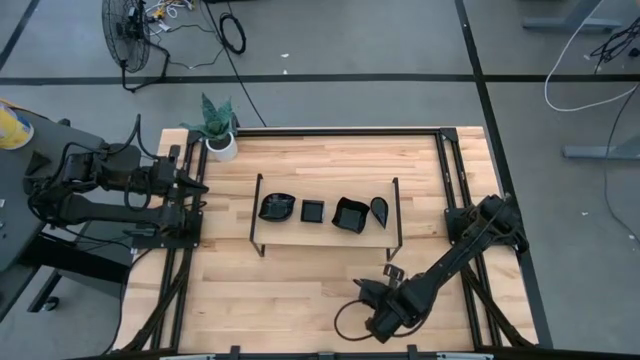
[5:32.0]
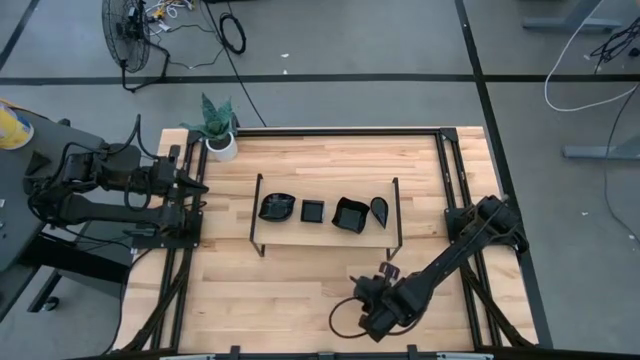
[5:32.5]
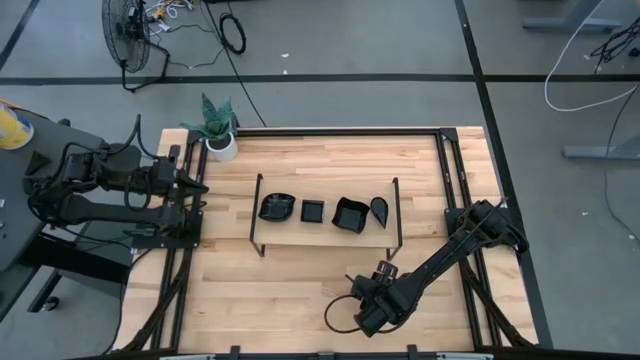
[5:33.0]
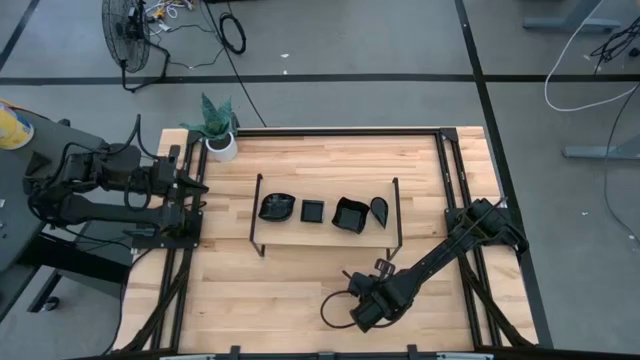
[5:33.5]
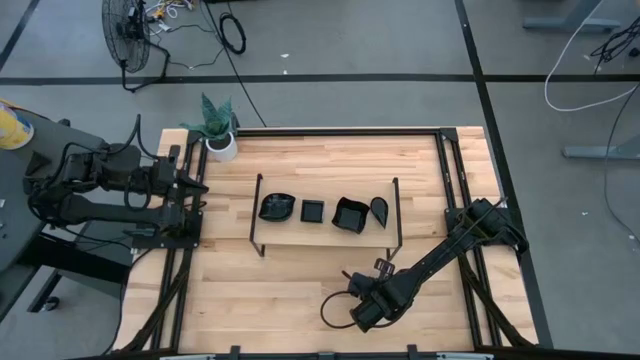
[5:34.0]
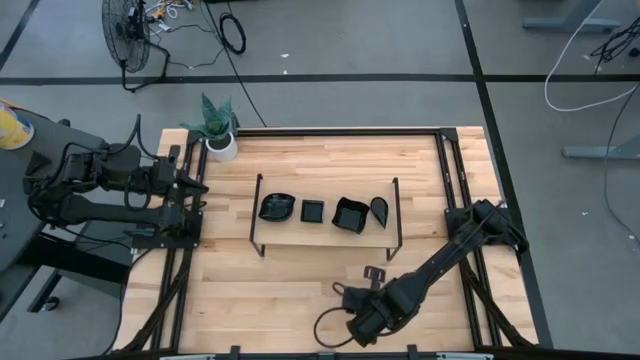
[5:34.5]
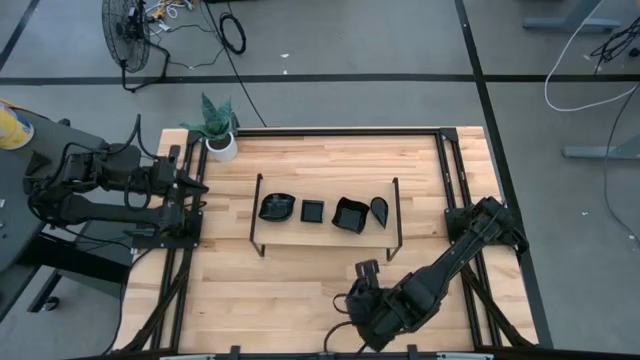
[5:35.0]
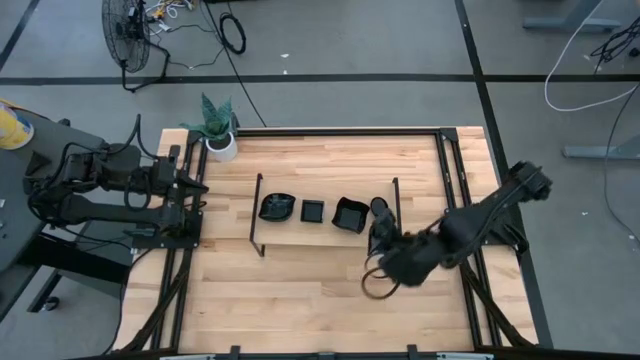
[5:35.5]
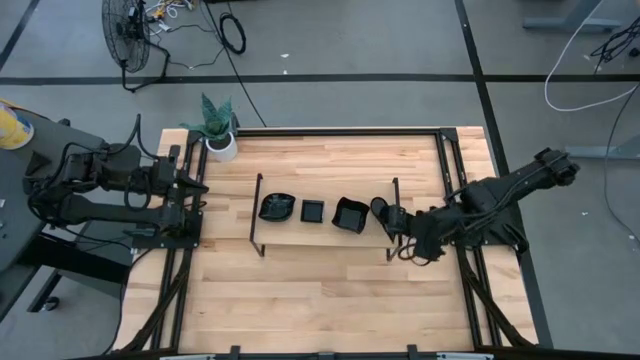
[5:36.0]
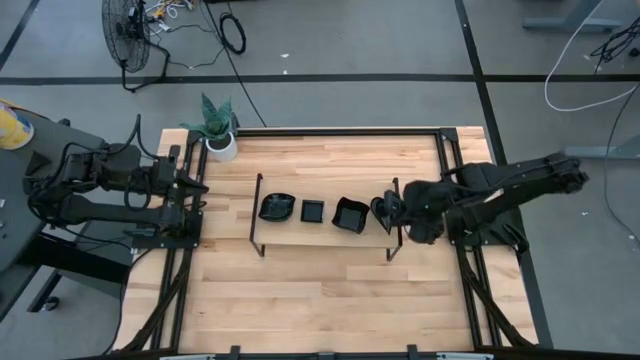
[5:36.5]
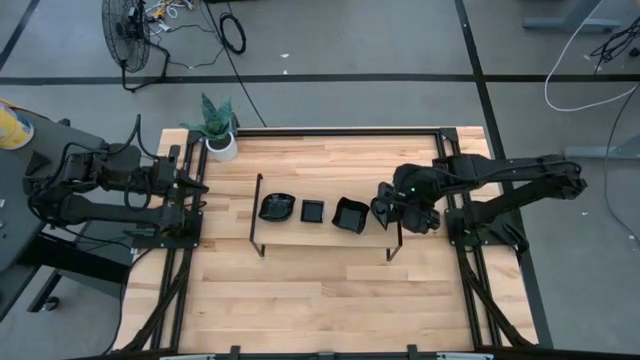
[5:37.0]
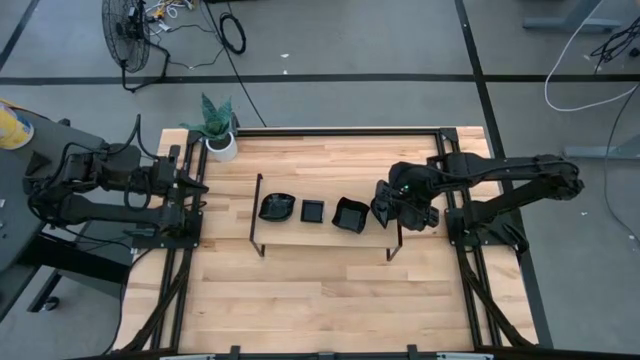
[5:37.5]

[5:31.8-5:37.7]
Task: Pick & Place Mini shaped plates
Stack the drop shaped plate on top of the drop shaped plate on the shelf

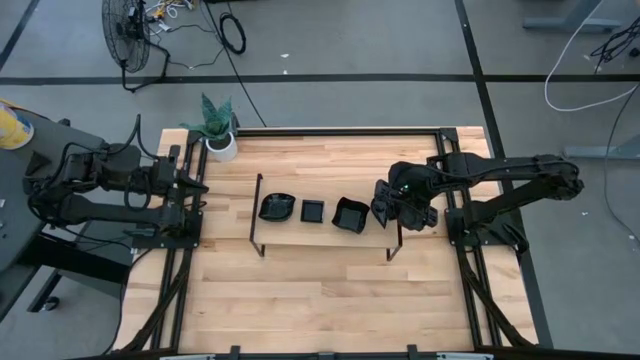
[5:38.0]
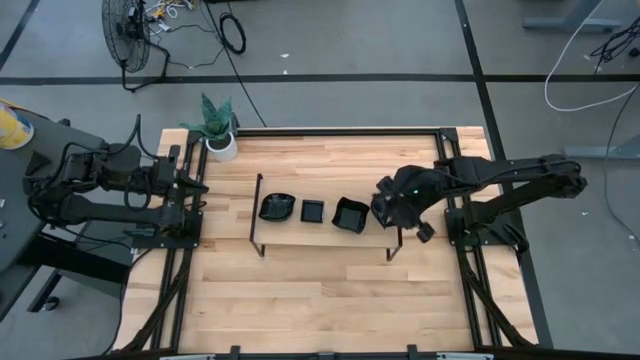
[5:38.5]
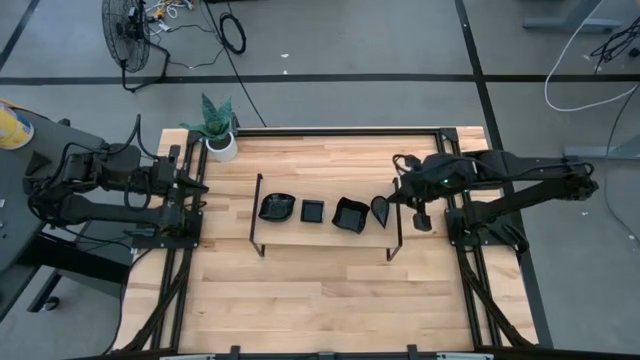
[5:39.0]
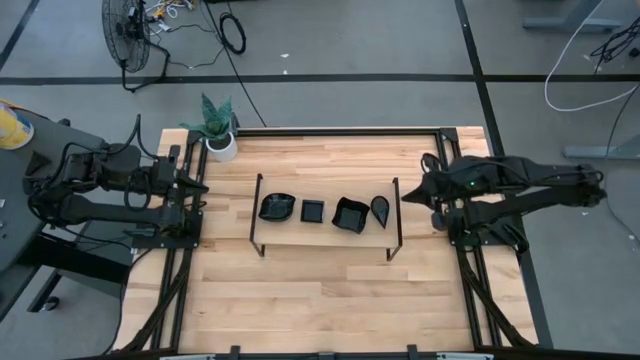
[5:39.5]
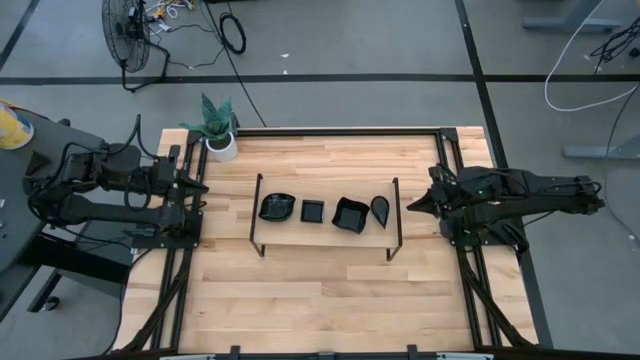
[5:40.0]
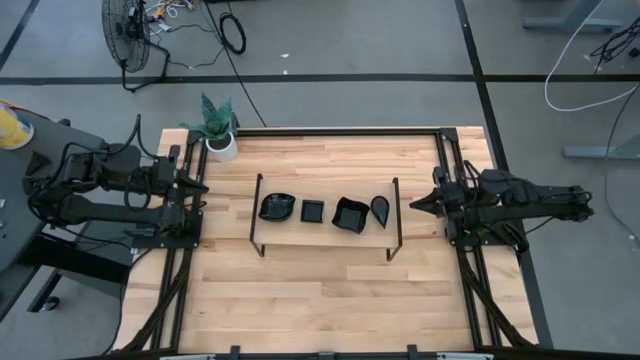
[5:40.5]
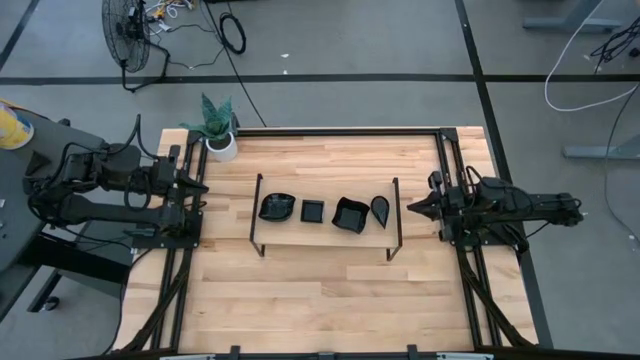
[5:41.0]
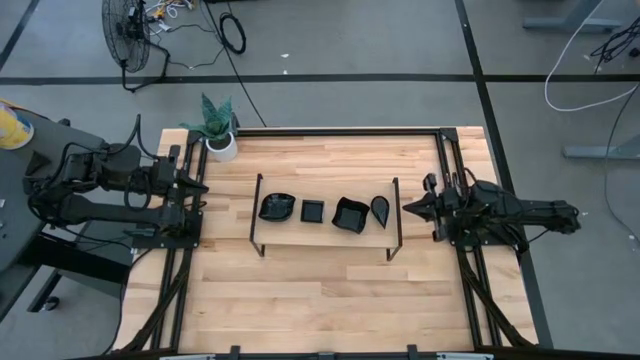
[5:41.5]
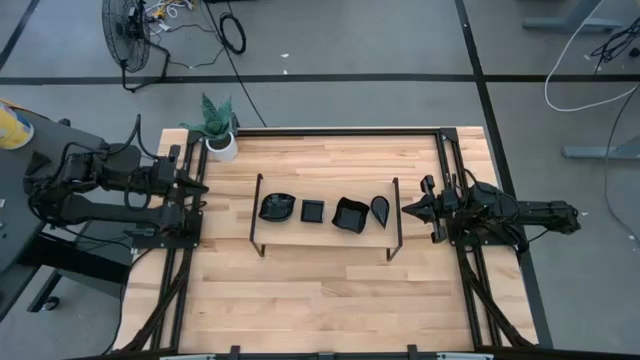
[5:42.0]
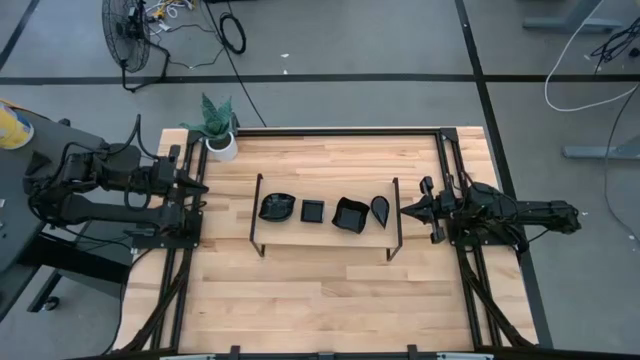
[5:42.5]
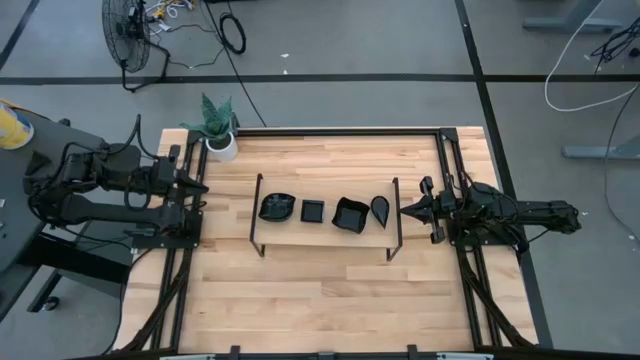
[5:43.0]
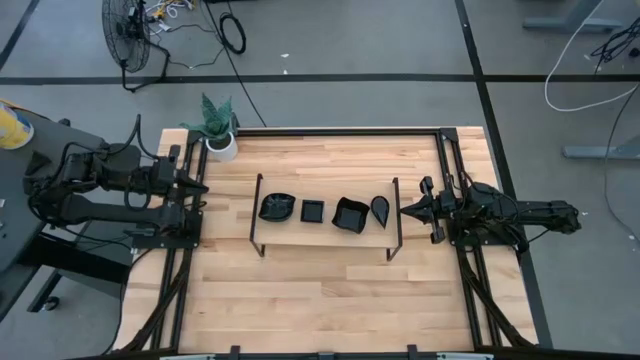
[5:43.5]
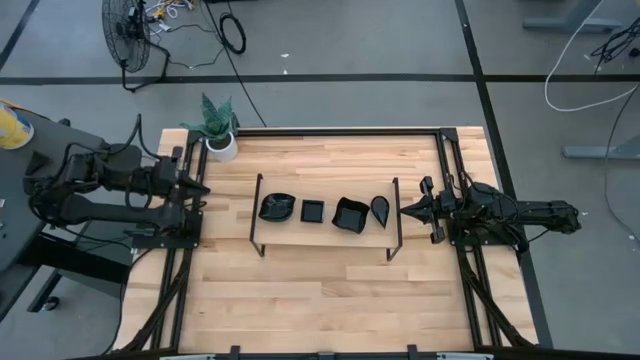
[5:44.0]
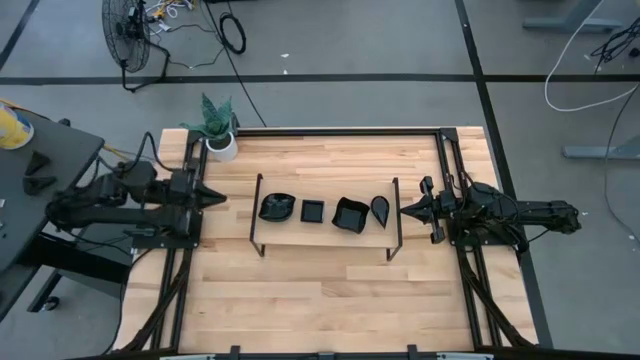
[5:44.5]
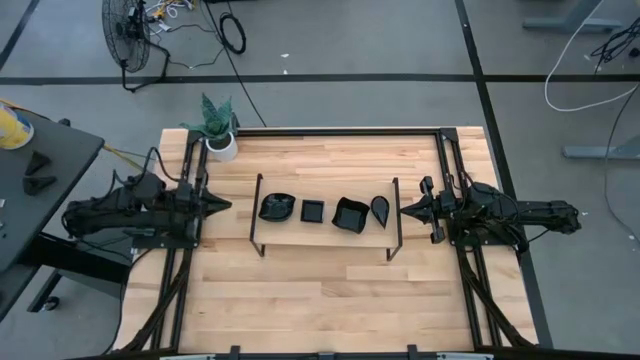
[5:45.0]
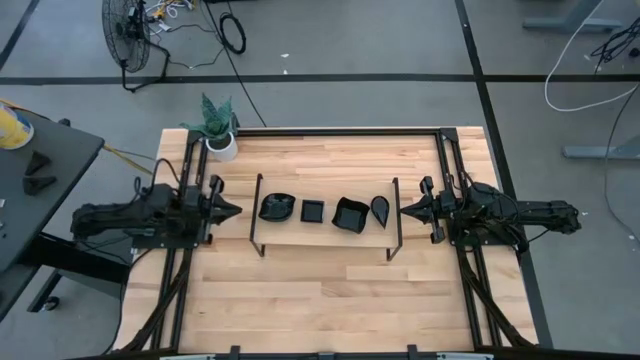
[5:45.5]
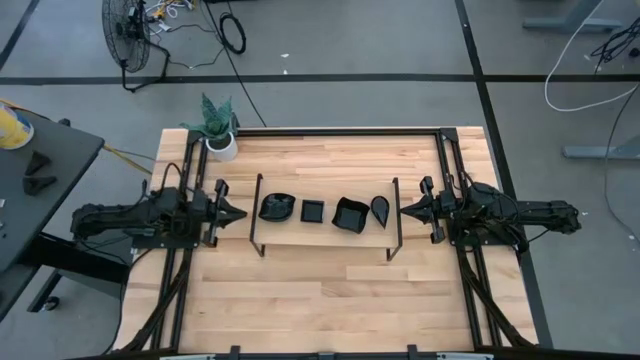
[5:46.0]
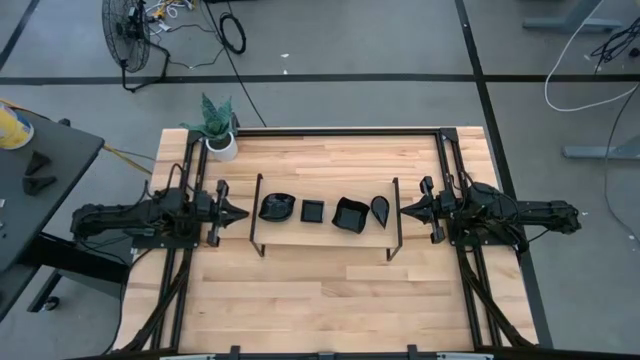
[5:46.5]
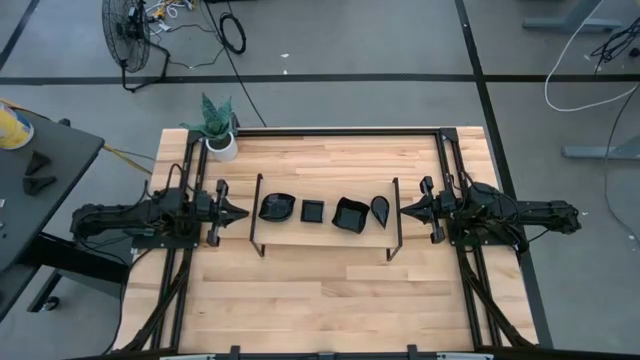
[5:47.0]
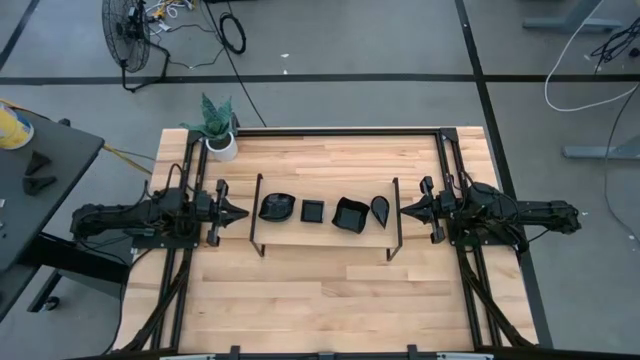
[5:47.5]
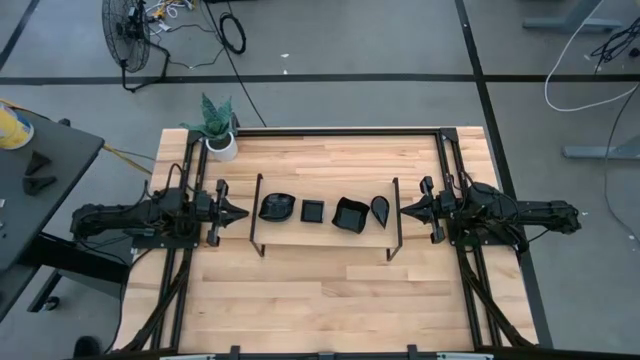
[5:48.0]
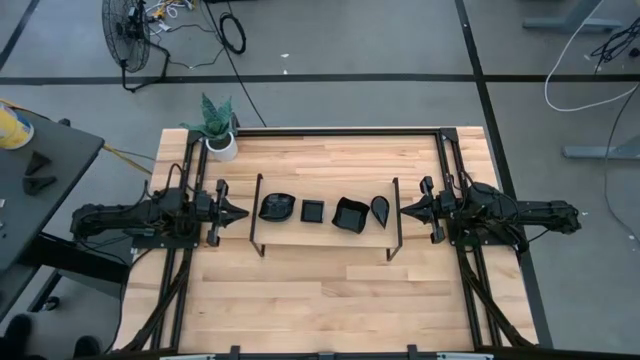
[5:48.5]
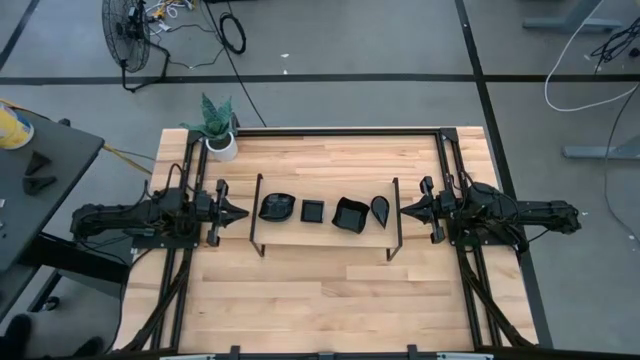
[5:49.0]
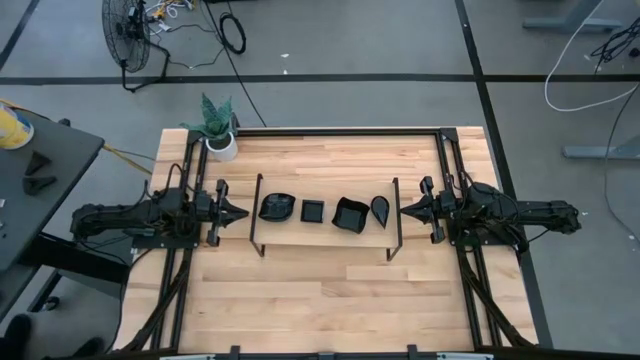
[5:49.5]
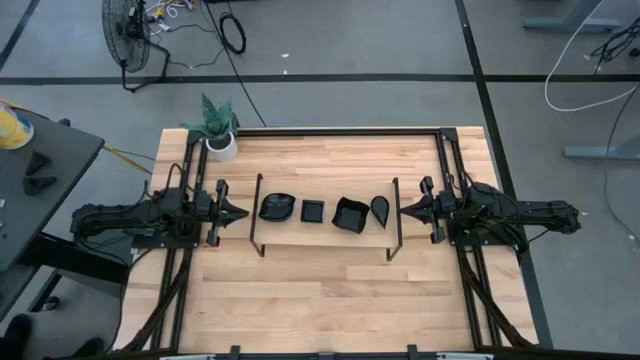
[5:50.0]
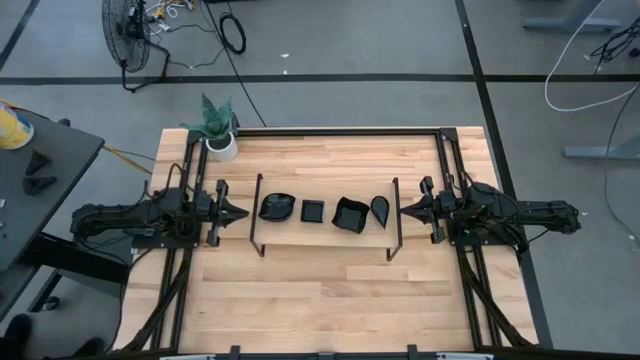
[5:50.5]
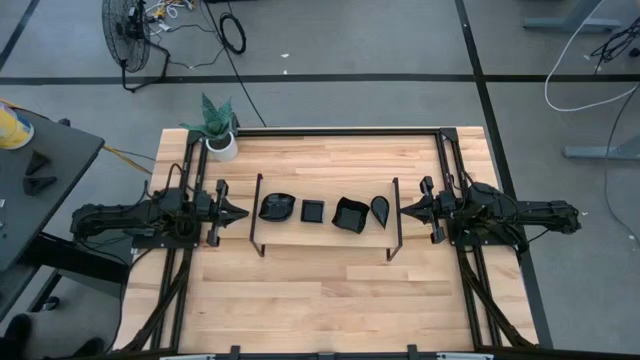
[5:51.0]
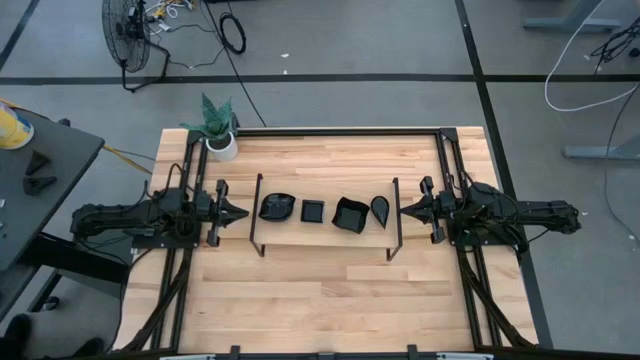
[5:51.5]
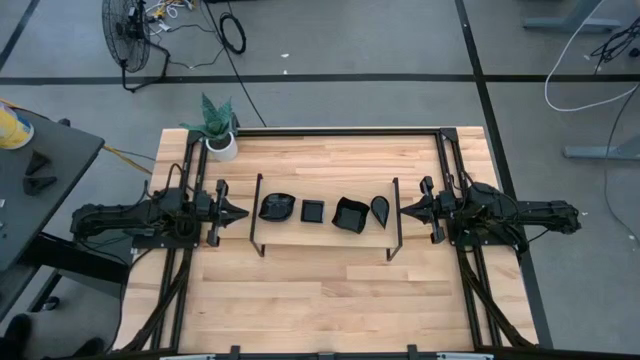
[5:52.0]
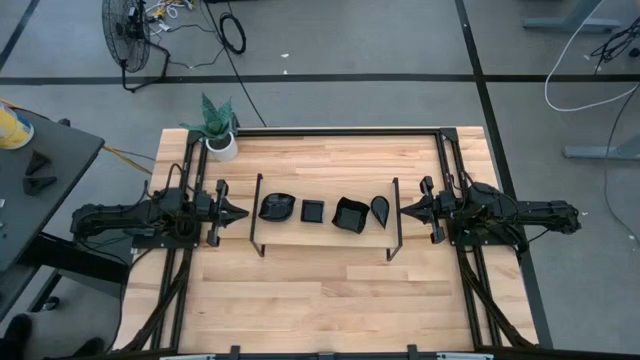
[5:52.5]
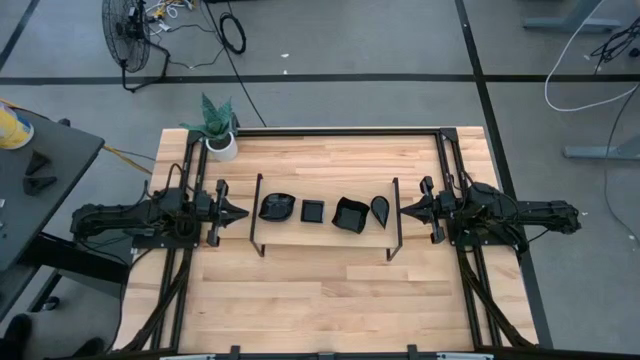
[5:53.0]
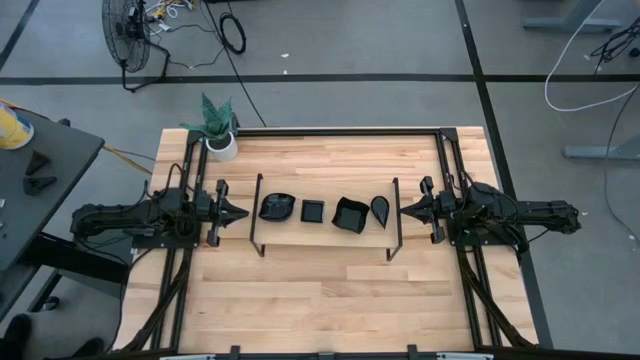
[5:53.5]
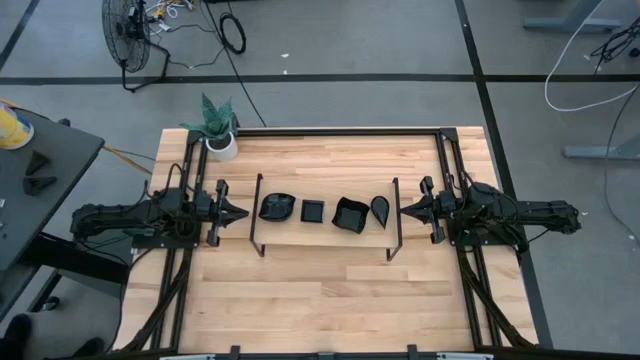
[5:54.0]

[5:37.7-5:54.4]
Return to Home Position
